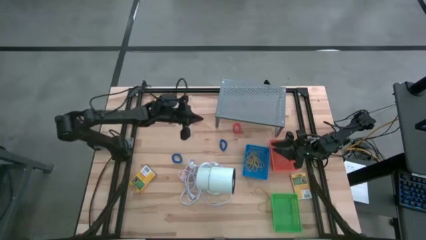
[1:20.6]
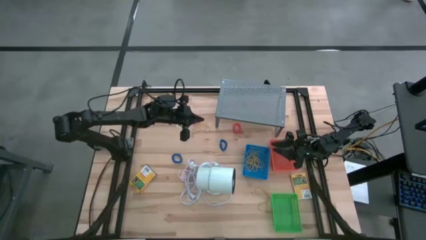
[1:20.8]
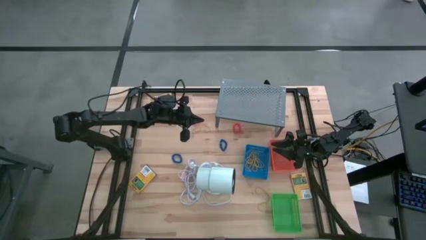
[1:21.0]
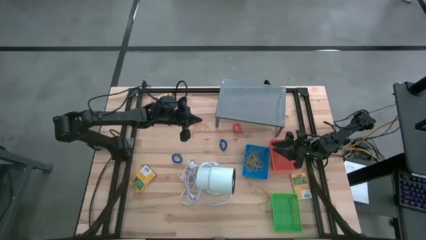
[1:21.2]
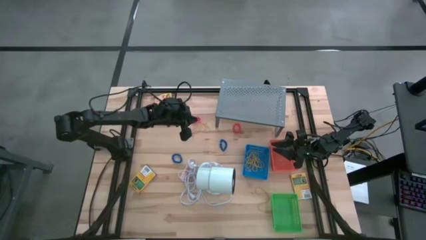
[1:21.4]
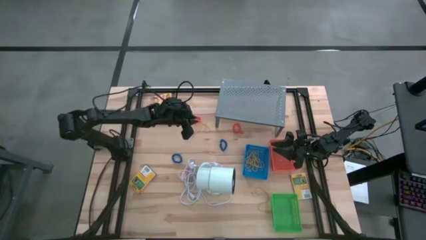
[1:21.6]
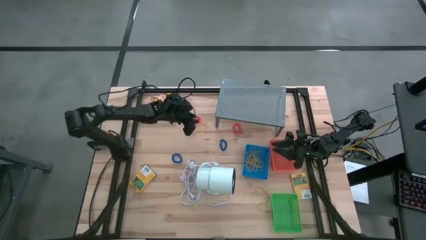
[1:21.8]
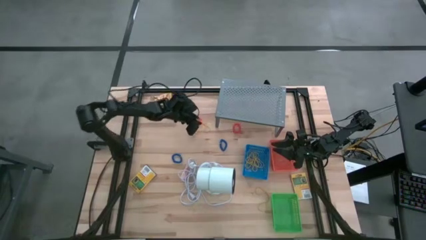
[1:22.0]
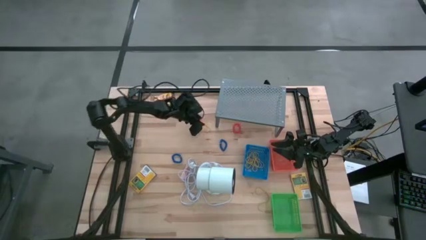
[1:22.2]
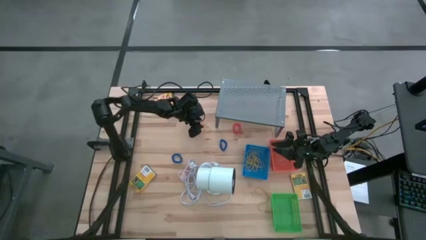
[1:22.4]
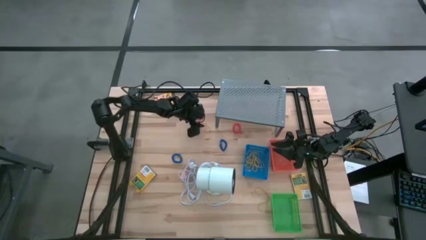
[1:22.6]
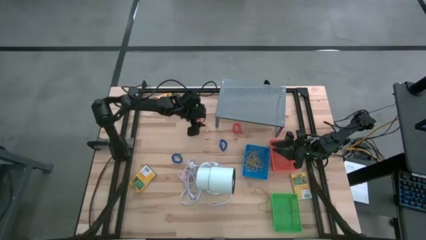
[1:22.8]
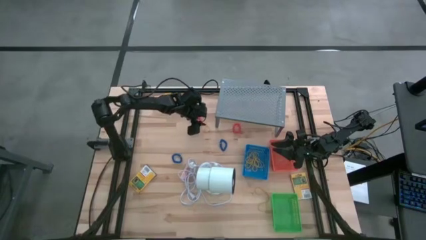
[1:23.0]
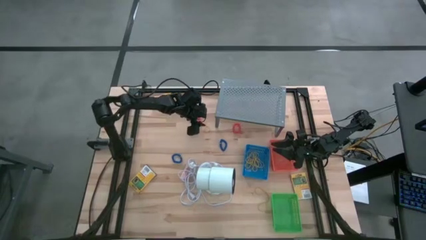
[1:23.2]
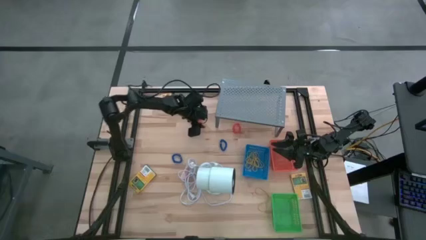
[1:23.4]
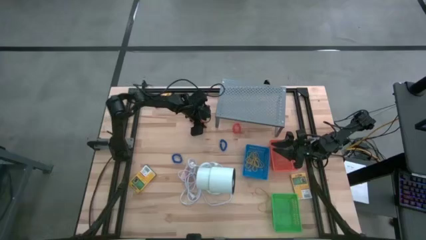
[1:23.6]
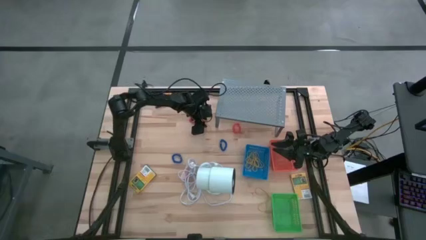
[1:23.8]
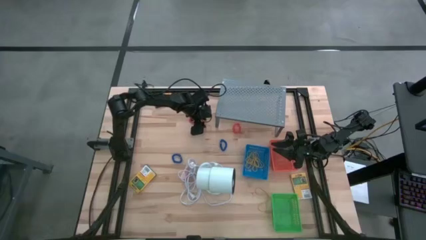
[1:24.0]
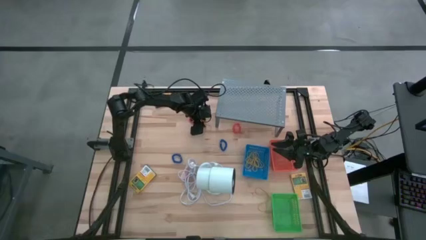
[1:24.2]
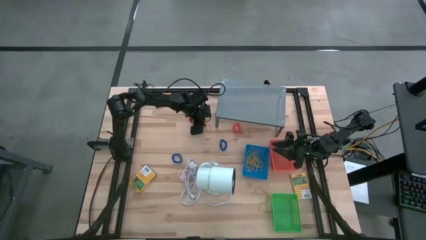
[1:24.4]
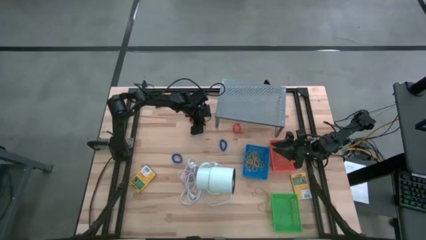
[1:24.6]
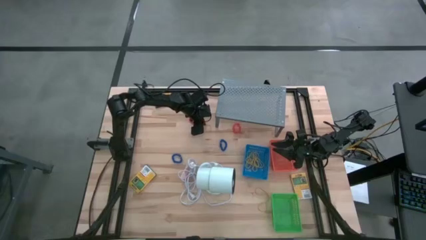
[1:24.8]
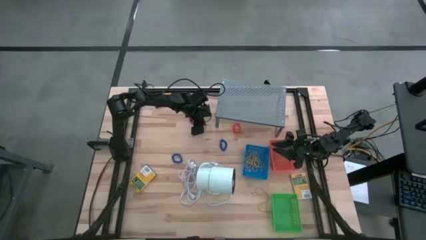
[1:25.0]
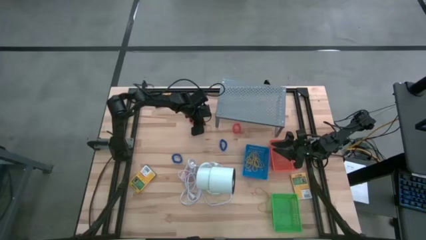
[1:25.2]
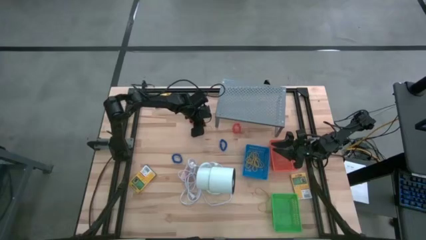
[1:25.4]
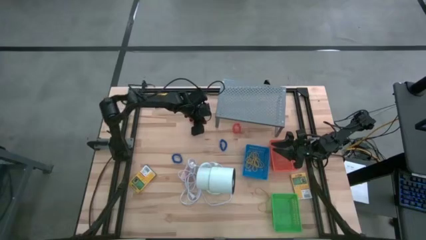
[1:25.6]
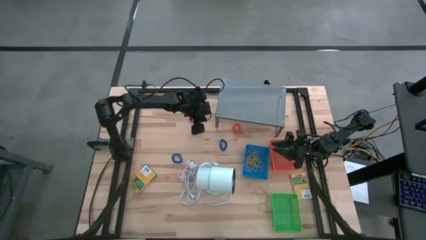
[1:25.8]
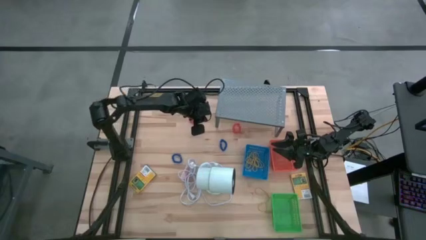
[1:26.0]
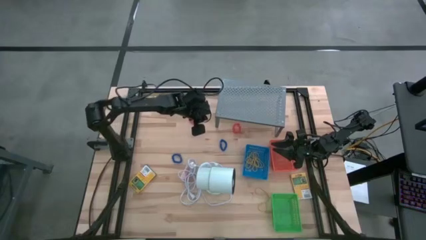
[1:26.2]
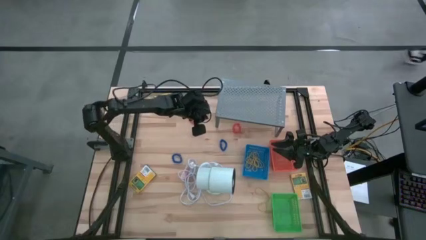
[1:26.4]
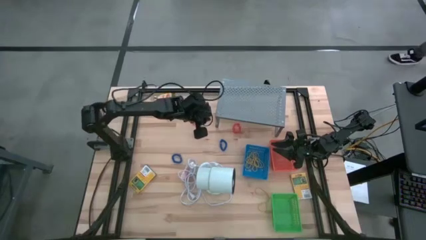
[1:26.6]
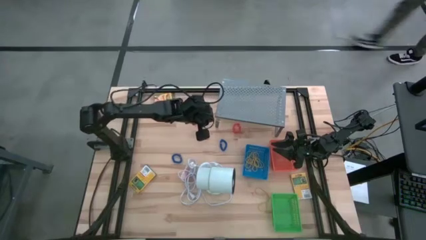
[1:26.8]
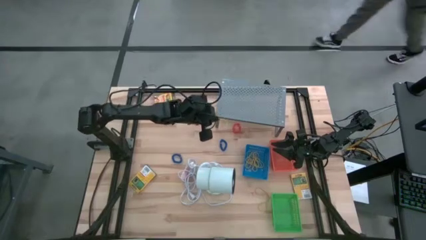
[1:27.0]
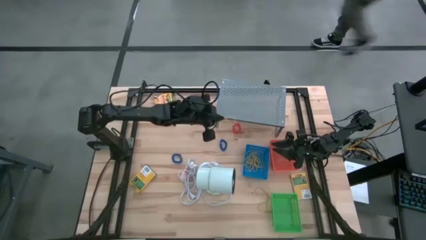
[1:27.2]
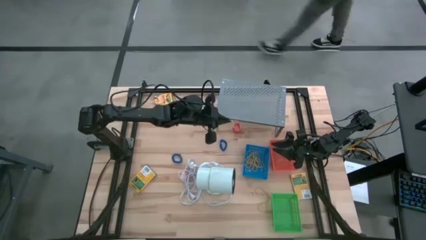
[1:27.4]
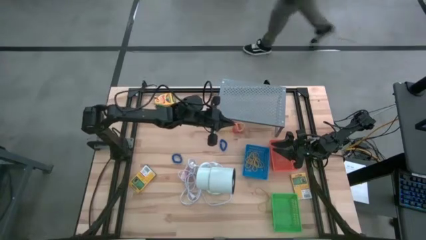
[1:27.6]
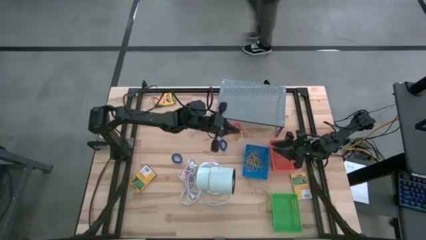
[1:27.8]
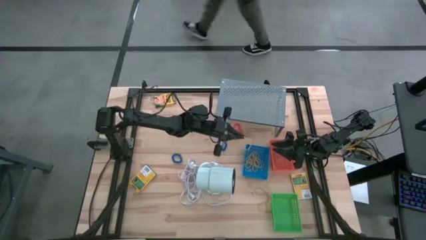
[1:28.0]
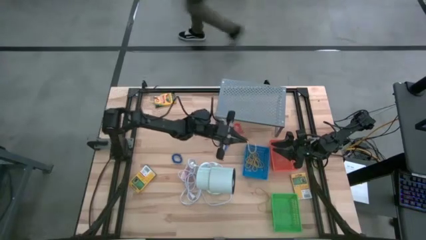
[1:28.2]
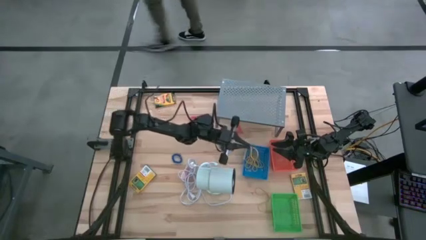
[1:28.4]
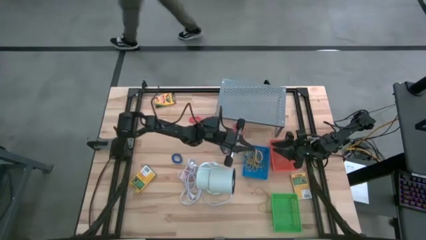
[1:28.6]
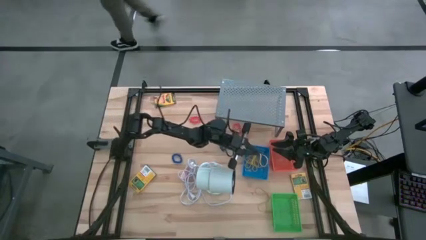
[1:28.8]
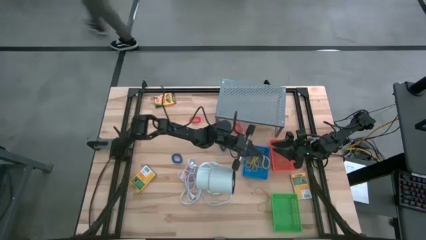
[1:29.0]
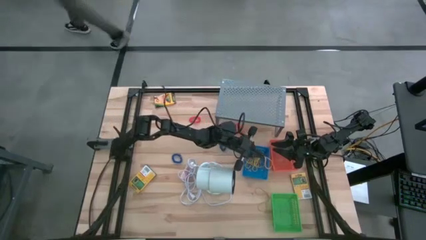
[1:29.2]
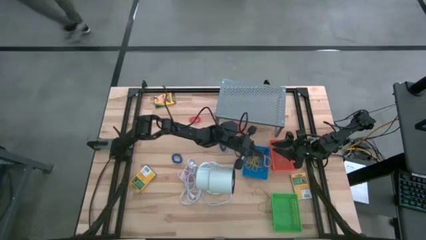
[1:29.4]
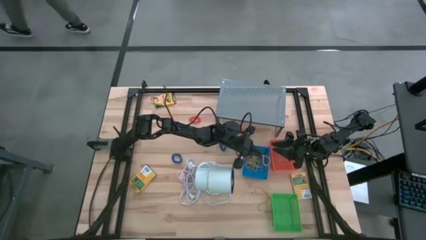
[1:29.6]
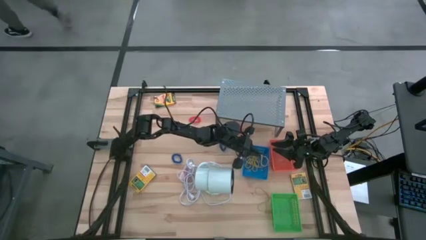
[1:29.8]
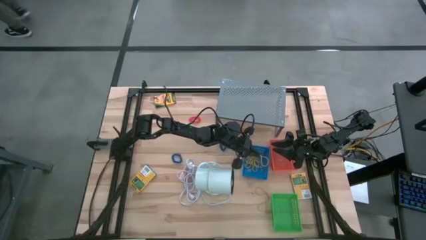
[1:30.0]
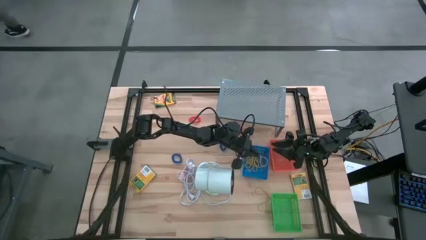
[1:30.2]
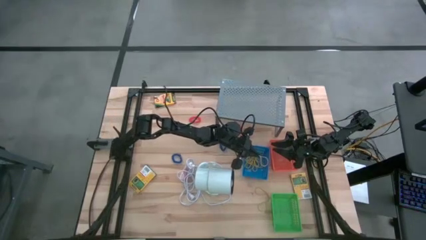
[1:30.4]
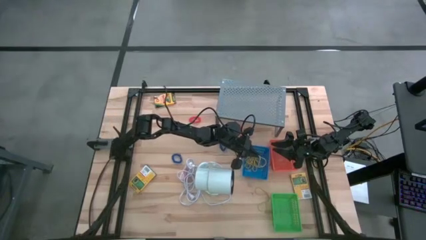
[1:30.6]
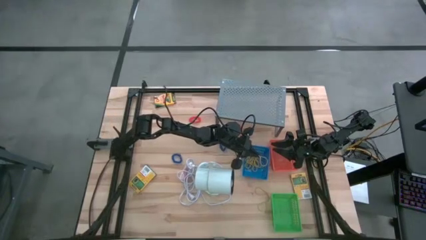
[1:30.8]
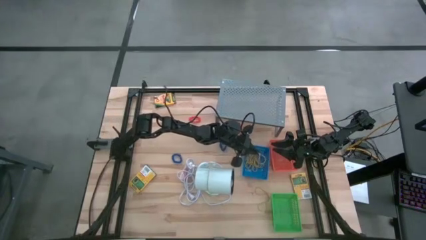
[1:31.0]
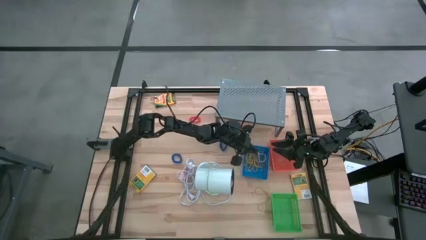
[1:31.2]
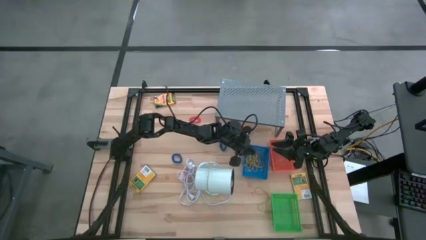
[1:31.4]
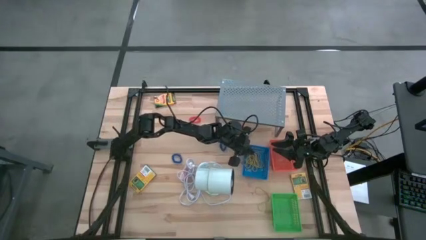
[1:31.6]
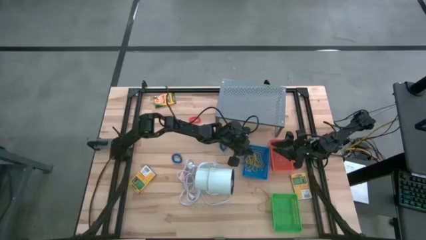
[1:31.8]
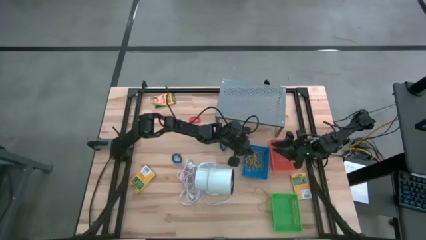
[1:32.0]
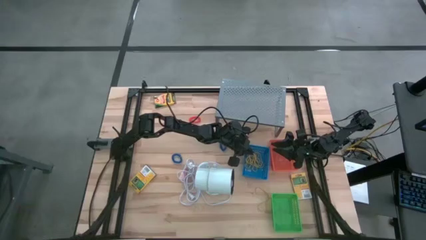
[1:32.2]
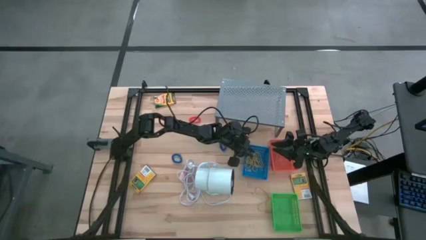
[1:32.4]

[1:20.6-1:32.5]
Task: Pick & Place Office Desk Supplies
Put the yellow rubber band into the blue bin
